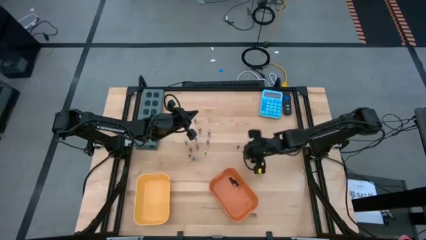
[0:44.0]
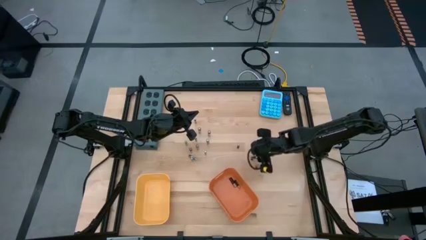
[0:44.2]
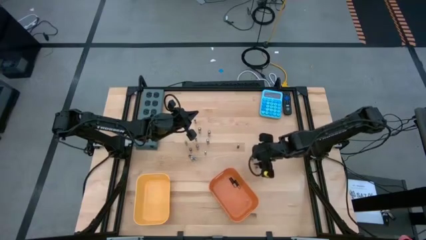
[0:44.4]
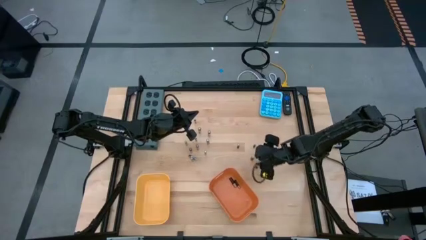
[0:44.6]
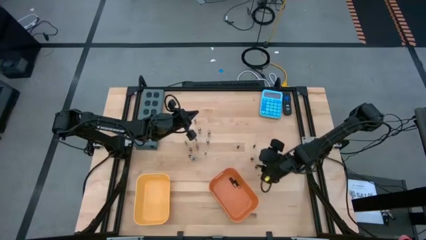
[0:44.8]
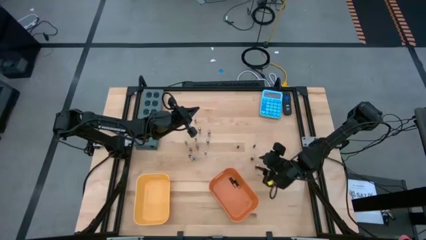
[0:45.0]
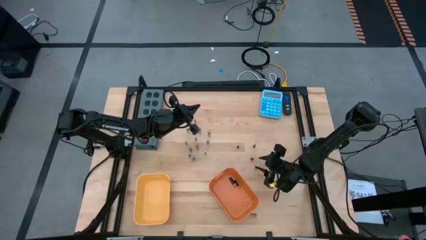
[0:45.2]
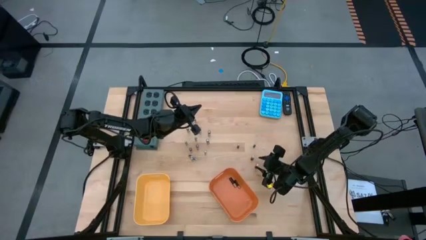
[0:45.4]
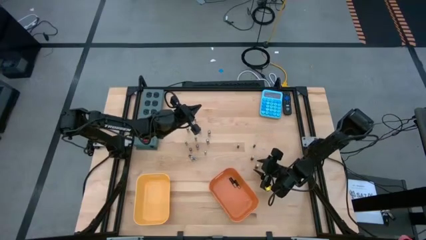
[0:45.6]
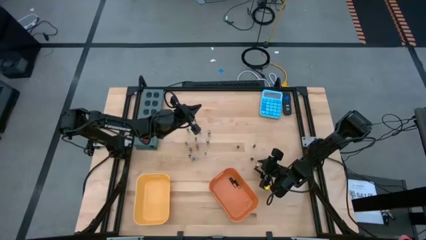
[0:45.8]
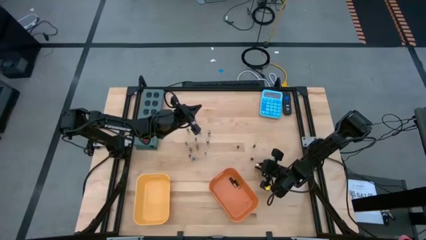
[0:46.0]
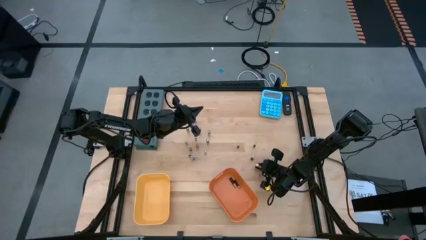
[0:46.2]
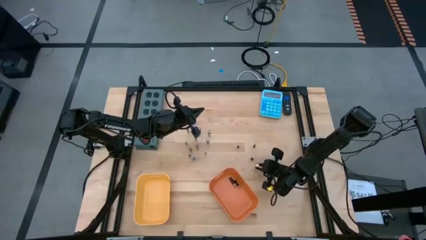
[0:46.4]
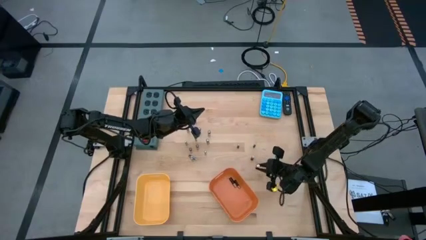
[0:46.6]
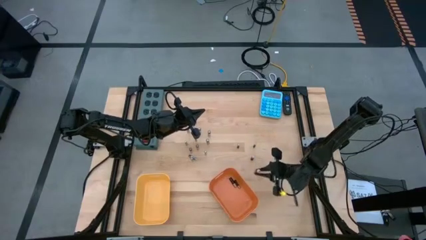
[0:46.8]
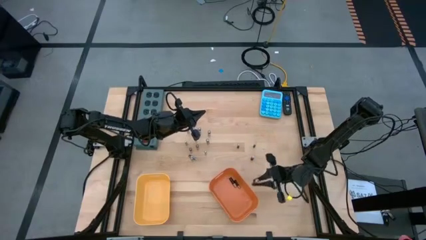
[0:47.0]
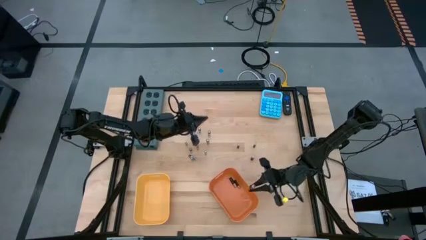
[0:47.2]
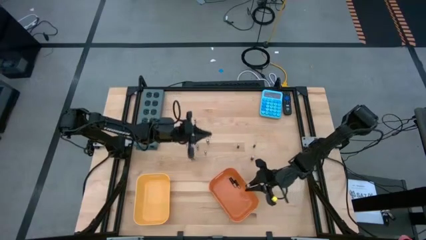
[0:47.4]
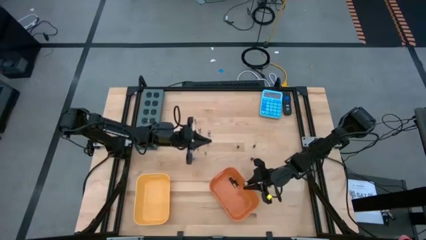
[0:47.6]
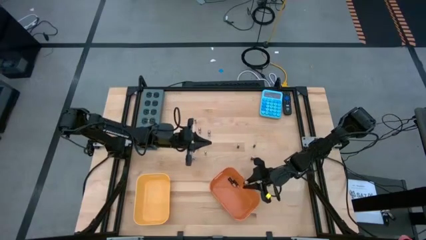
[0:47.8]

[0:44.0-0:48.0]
Task: Sort batteries
Put the brown battery into the orange bin

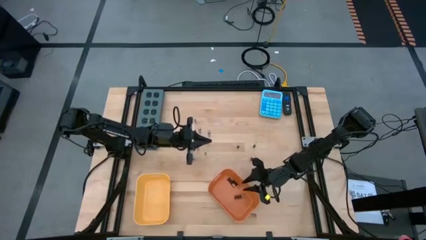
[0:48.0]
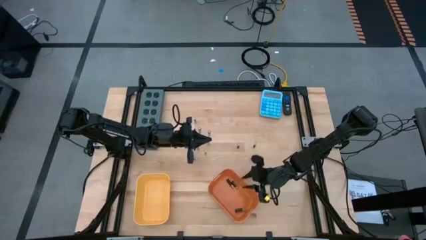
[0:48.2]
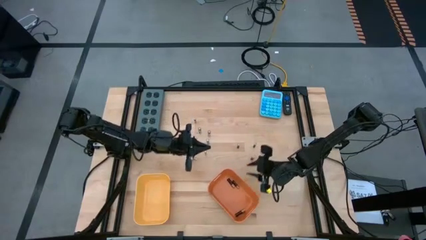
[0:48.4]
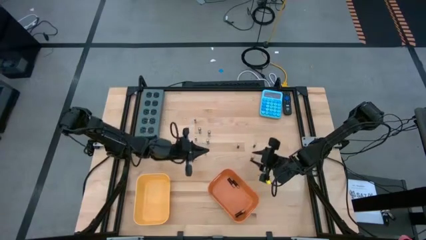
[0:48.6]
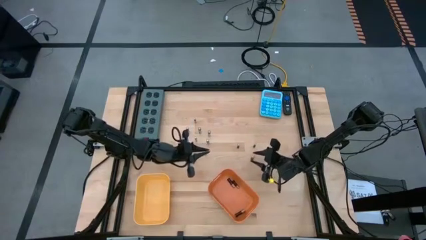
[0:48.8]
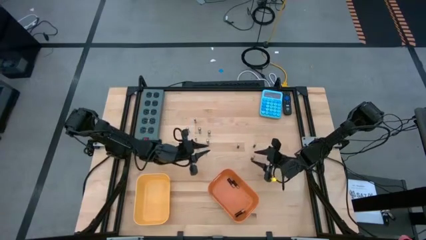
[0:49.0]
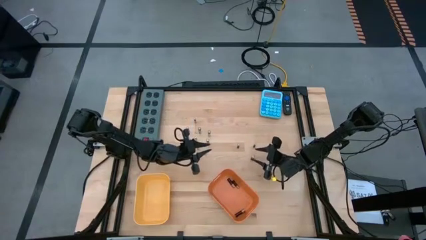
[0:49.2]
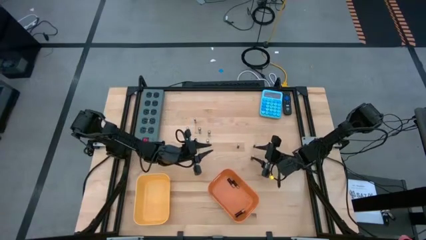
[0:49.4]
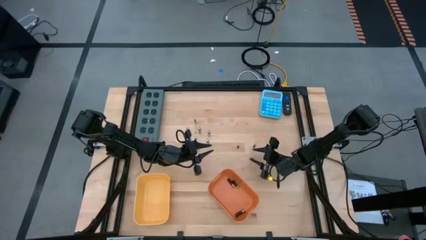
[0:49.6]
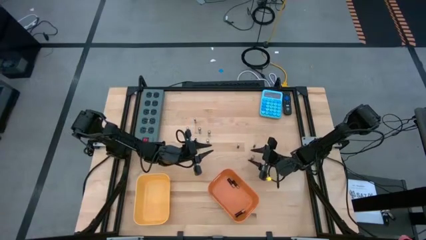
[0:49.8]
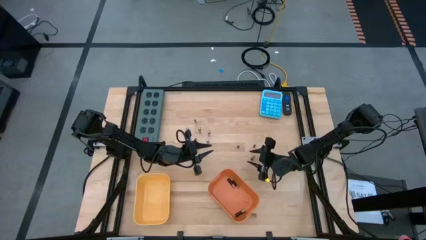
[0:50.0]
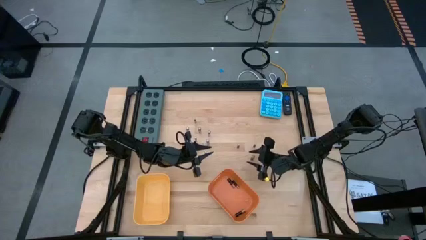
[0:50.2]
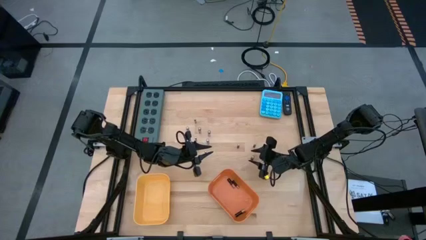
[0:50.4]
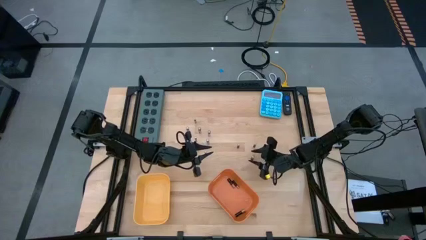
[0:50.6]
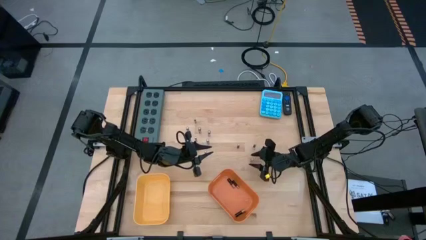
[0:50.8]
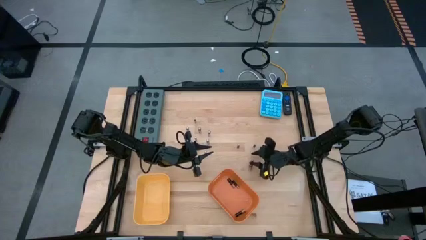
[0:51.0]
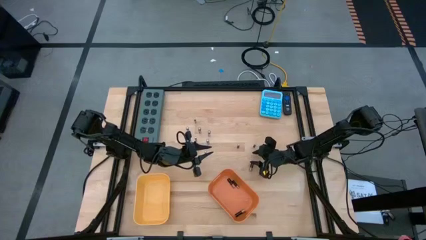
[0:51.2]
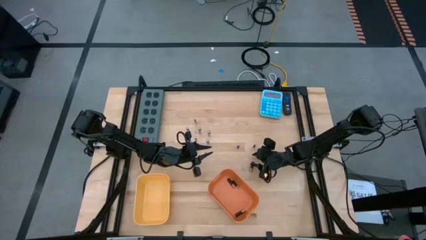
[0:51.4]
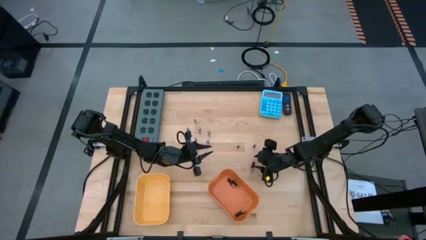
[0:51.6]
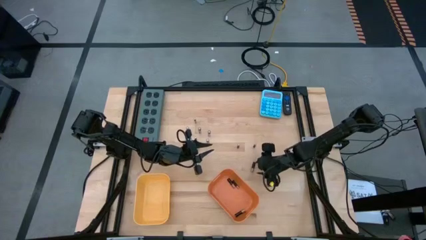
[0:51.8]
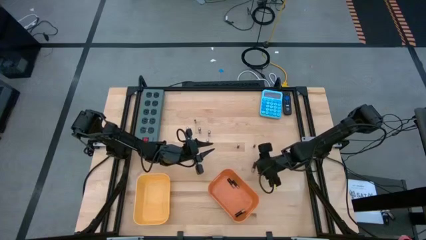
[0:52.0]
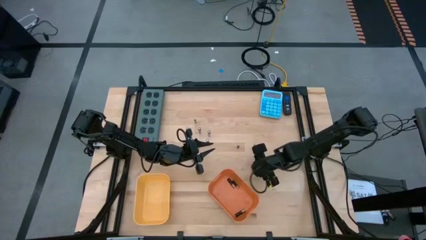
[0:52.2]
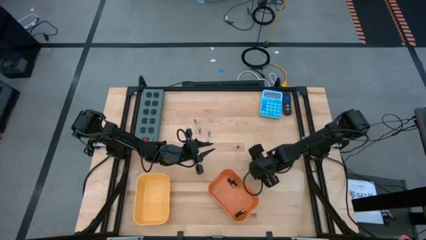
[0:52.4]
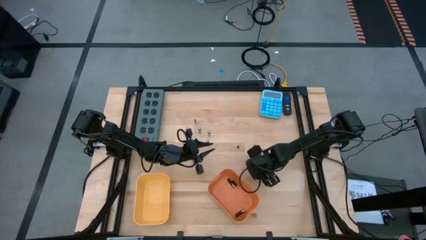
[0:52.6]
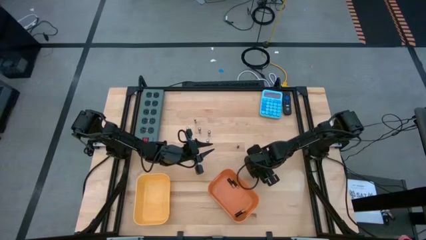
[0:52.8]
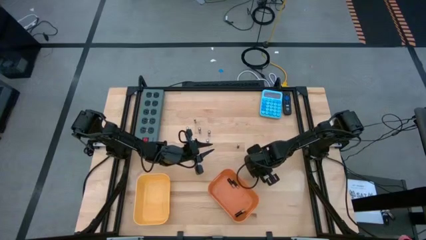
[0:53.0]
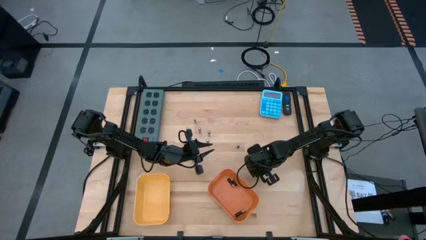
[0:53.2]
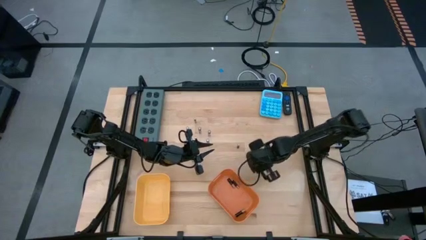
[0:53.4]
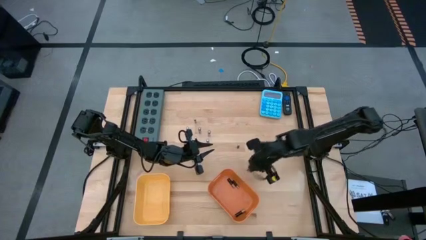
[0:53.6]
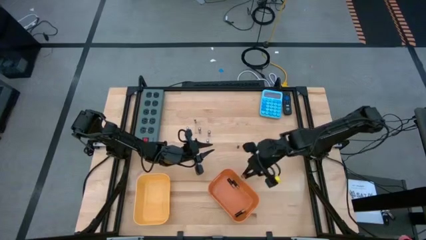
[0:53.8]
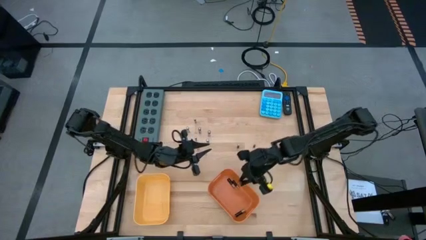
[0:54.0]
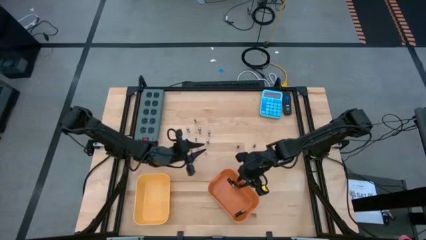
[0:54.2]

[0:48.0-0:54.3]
Put the brown battery into the orange bin

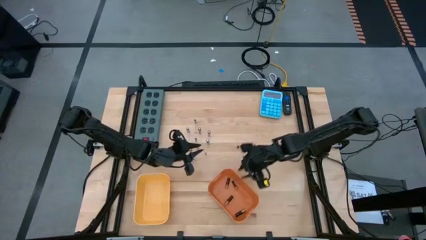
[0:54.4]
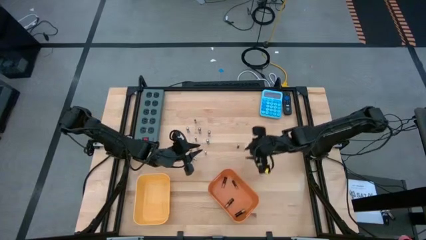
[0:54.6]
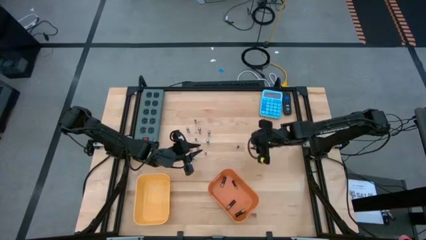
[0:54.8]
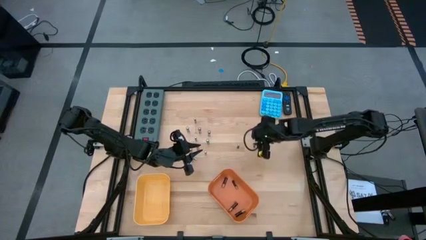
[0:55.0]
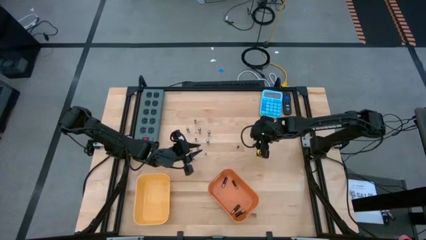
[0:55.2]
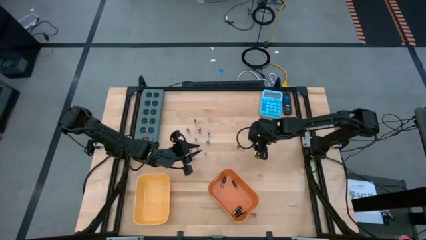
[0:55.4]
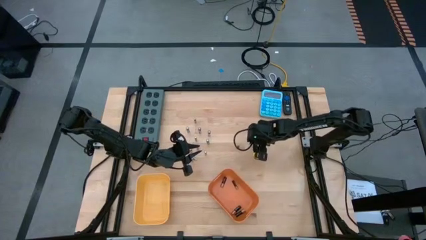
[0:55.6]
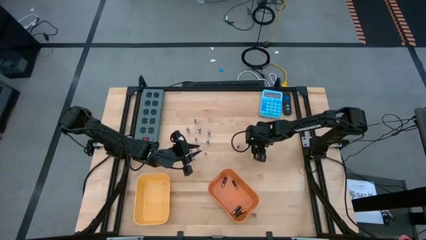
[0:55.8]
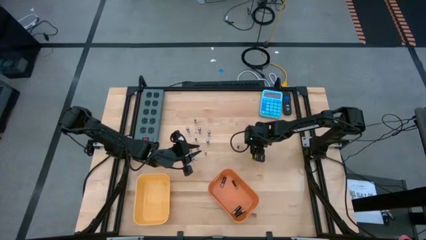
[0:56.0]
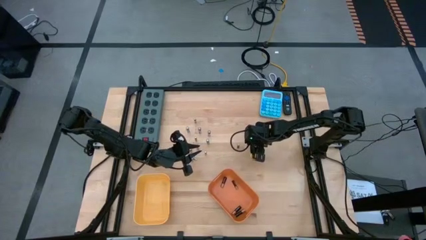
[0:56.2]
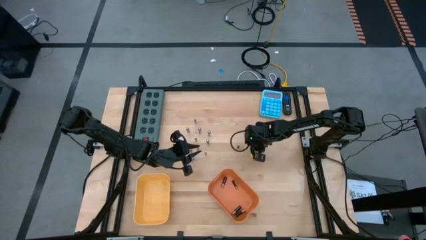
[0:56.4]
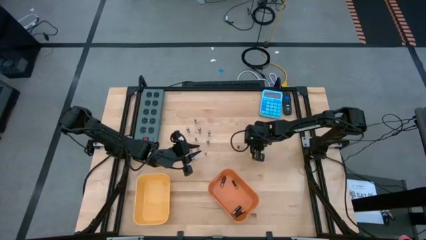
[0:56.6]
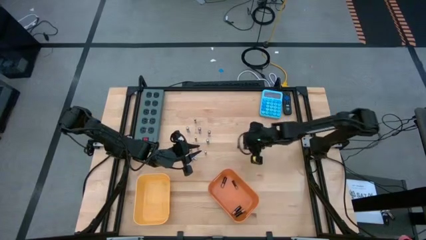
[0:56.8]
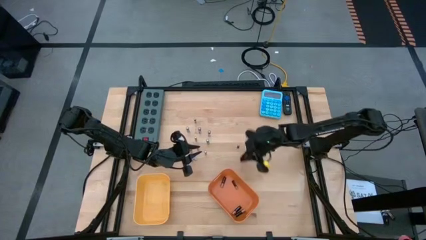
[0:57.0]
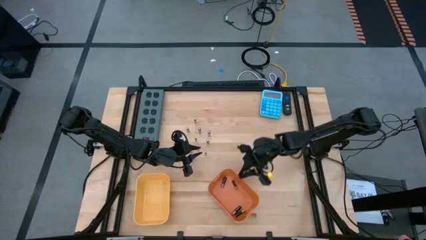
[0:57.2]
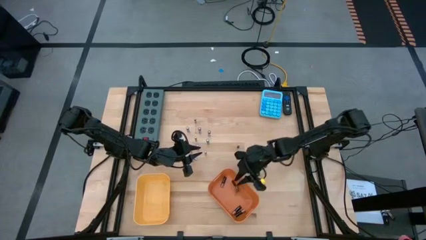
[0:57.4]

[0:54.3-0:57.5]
Put the brown battery into the orange bin

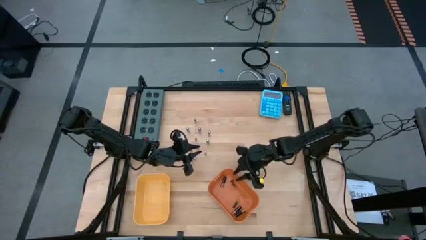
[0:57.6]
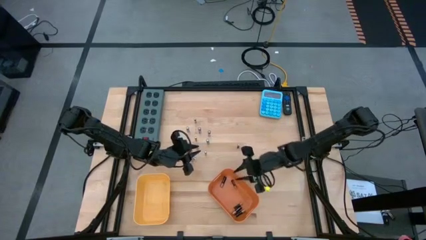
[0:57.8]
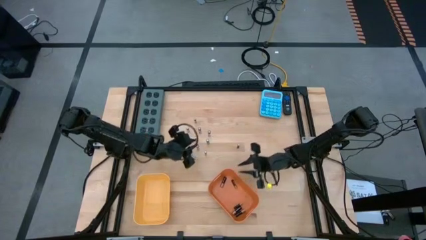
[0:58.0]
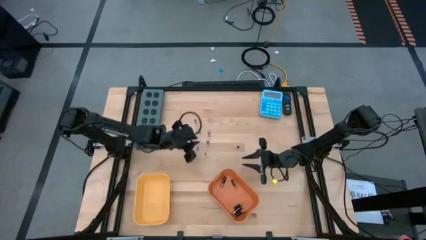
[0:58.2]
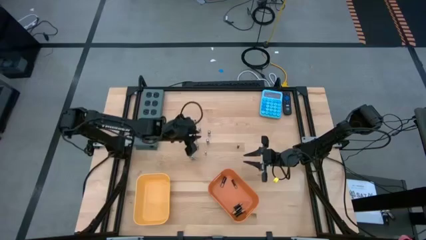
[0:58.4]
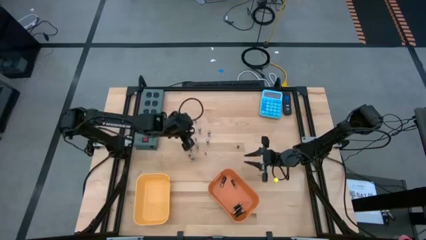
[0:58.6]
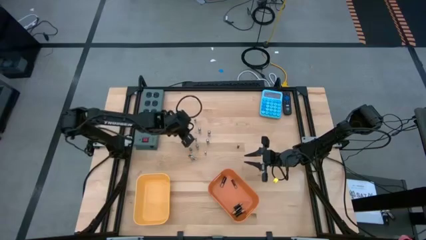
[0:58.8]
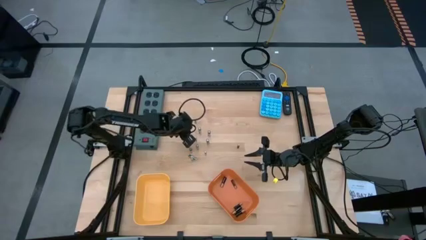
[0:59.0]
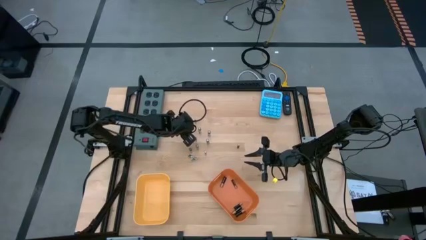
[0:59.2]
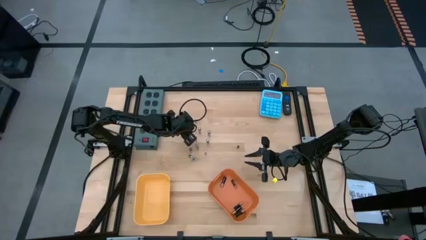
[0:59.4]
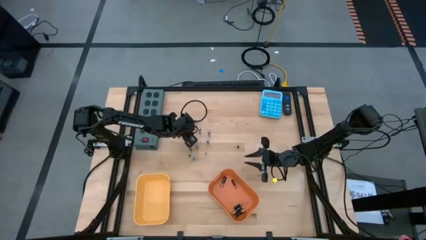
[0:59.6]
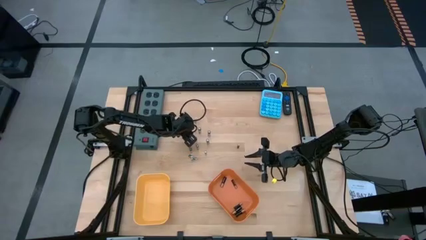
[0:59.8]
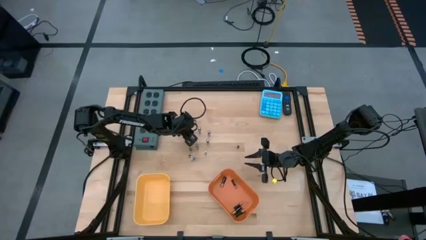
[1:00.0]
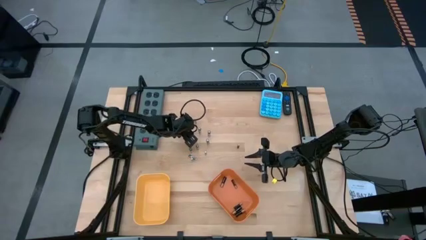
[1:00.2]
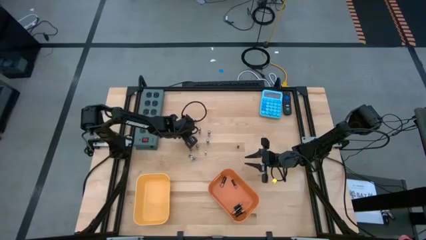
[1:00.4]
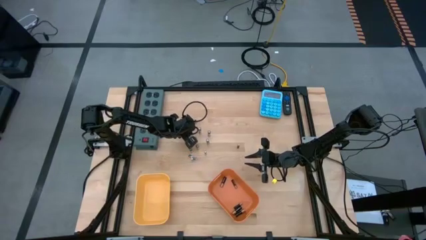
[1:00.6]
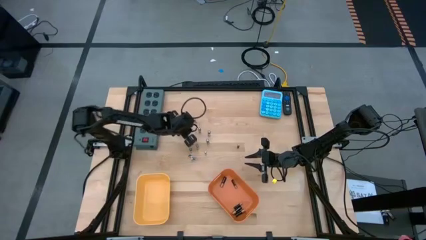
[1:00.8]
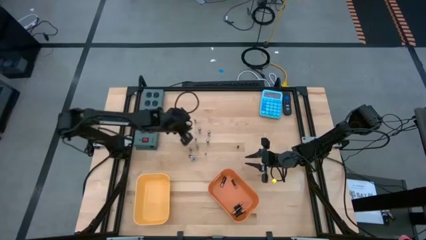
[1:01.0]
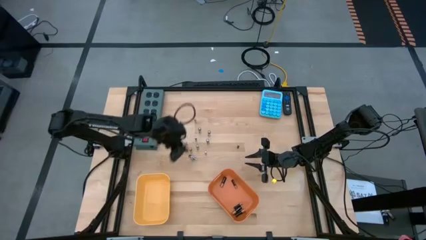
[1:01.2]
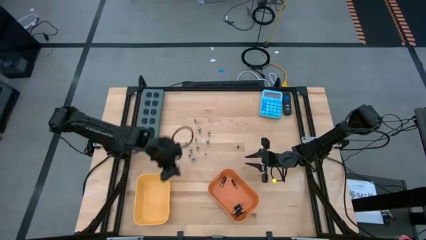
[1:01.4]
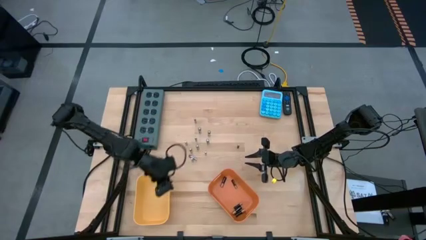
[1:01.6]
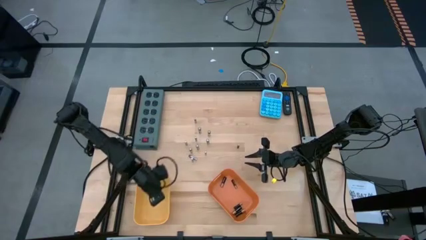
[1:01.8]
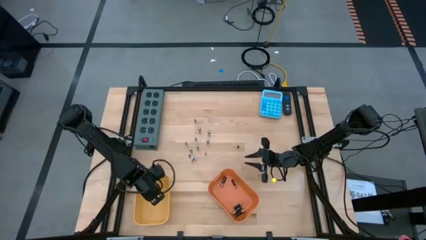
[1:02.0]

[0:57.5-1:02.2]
Put the silver battery into the yellow bin
